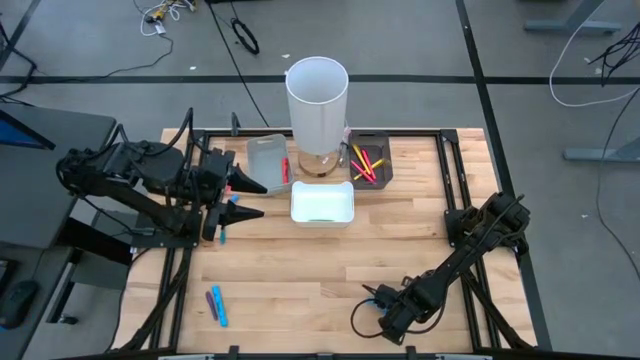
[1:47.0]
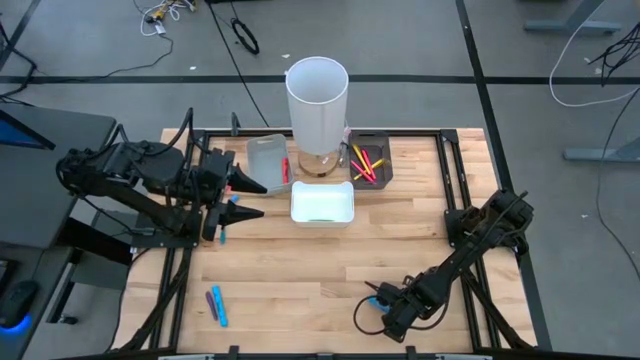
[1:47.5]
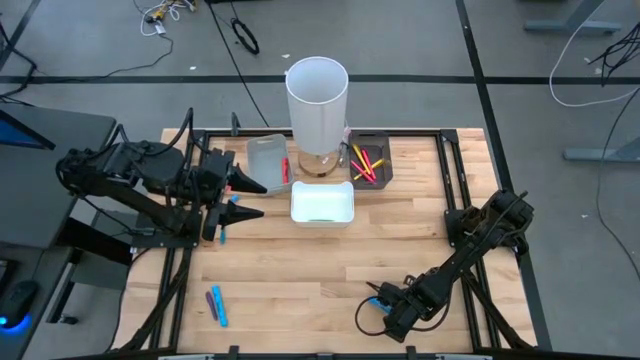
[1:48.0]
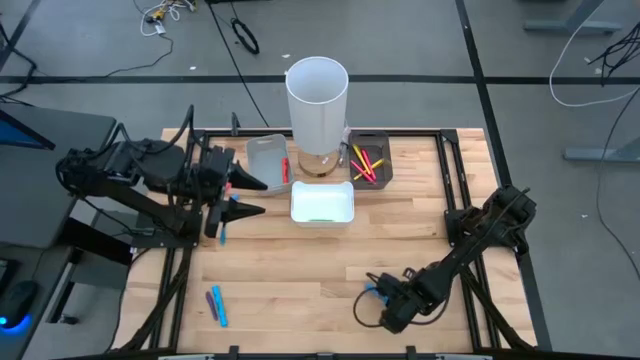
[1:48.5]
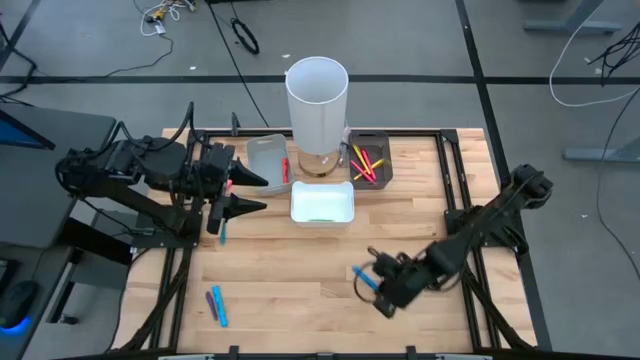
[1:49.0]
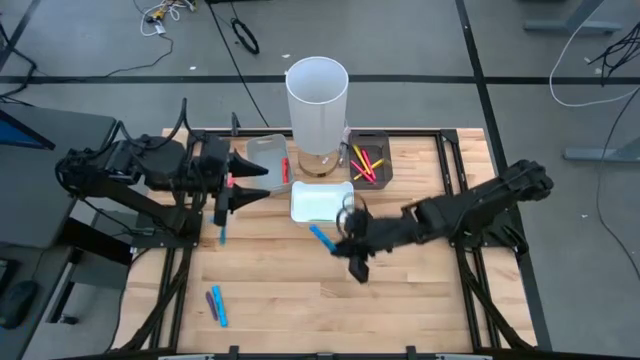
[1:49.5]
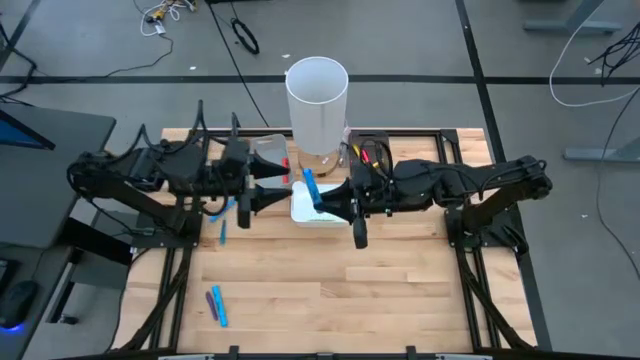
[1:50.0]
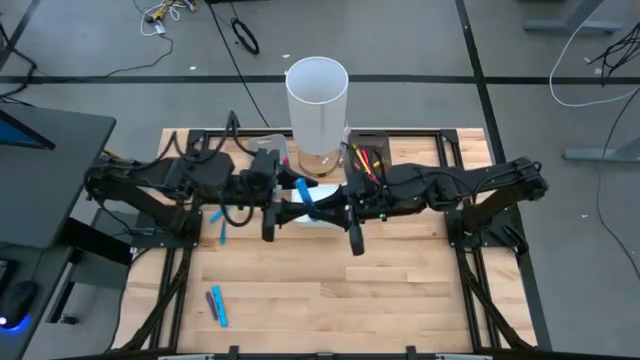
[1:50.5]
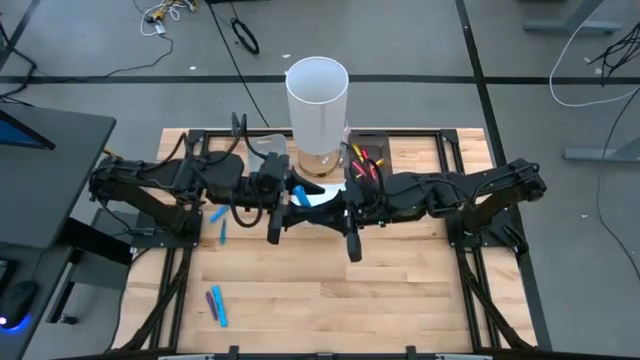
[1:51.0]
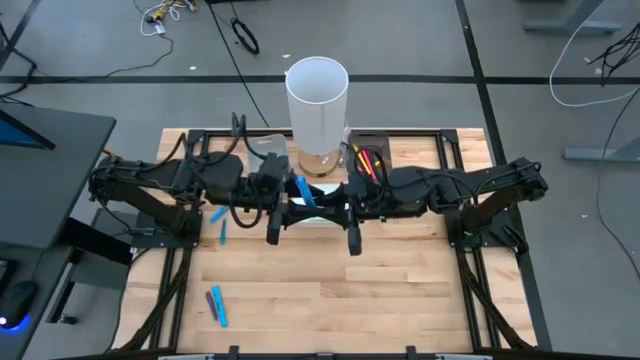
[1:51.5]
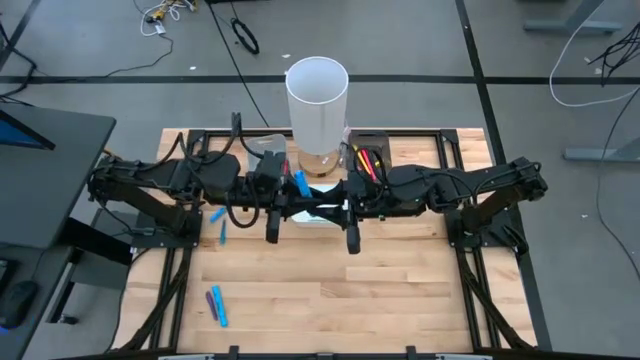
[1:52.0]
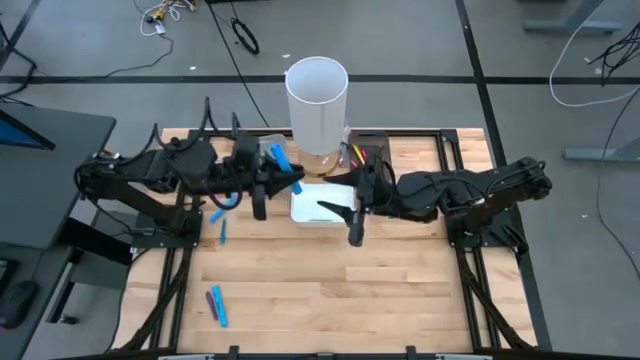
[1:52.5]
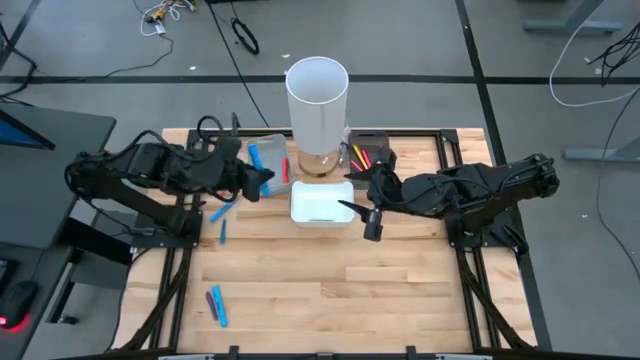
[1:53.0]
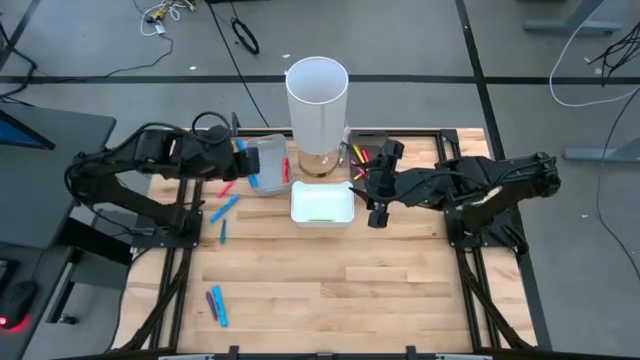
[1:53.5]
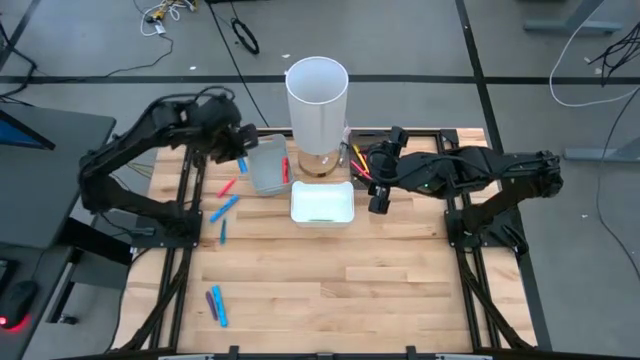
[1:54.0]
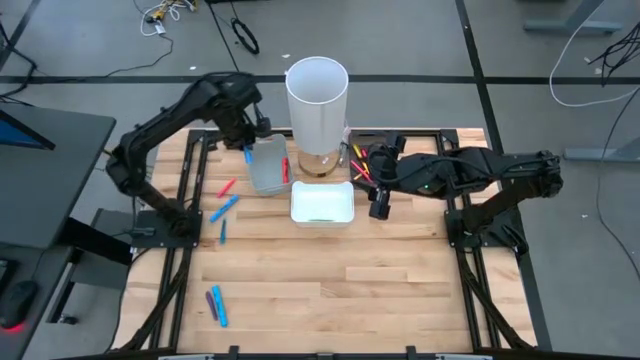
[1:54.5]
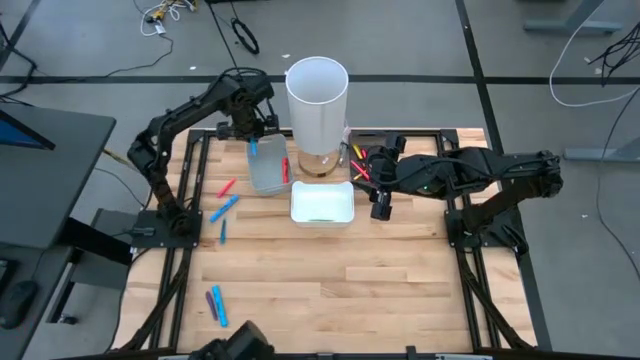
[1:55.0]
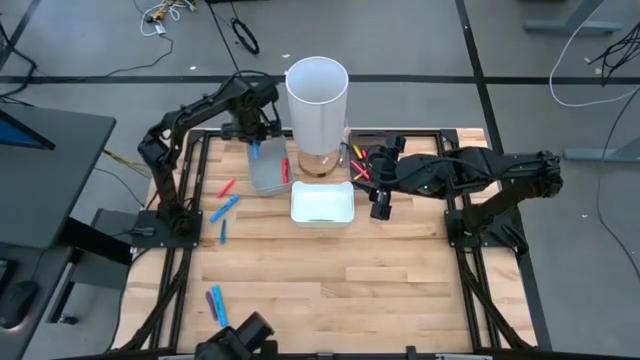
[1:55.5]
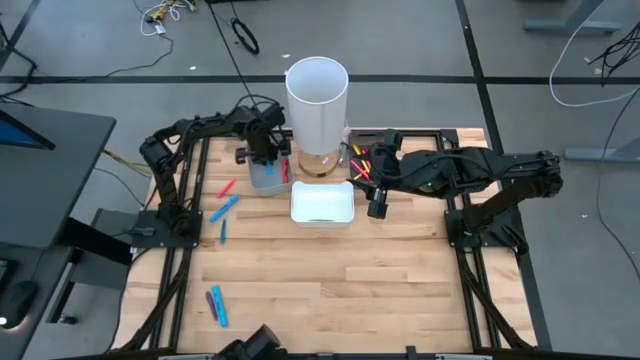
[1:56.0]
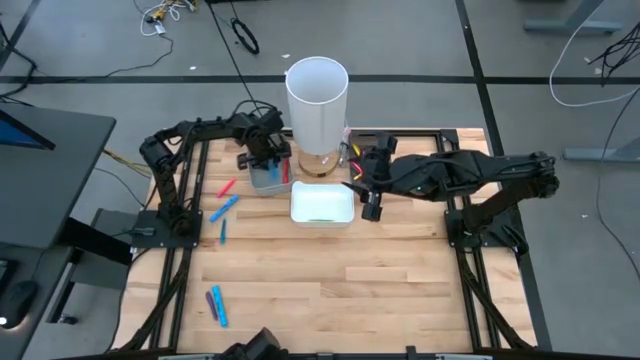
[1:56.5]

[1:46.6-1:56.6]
Task: Pick & Place Markers
Put the bottom right blue highlighter pen into the gray bin

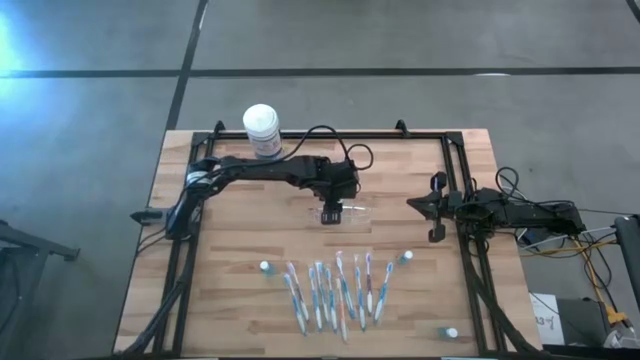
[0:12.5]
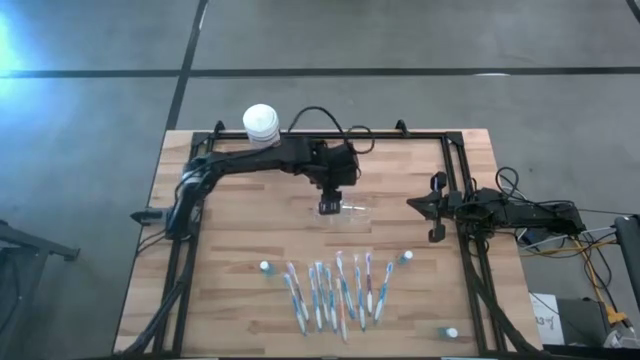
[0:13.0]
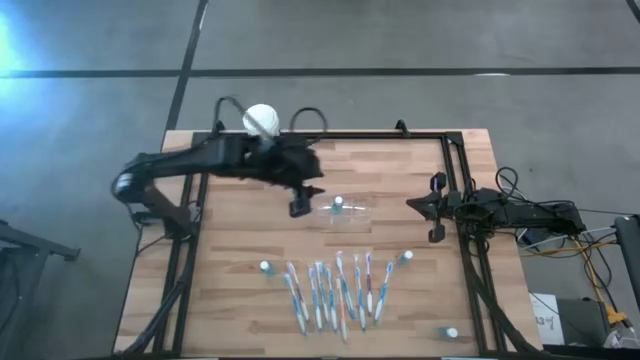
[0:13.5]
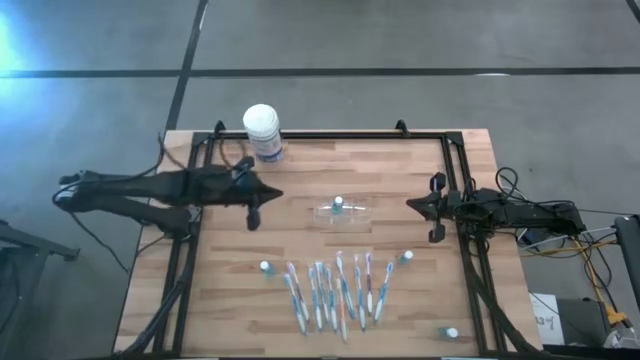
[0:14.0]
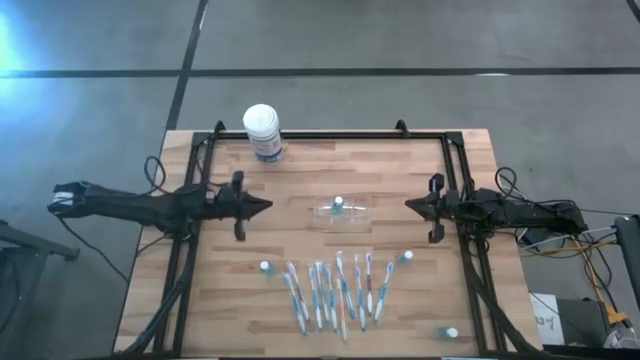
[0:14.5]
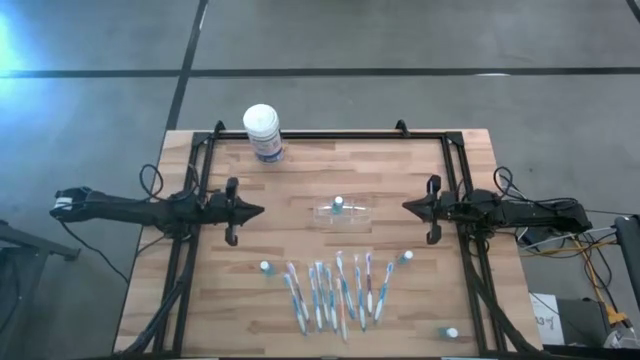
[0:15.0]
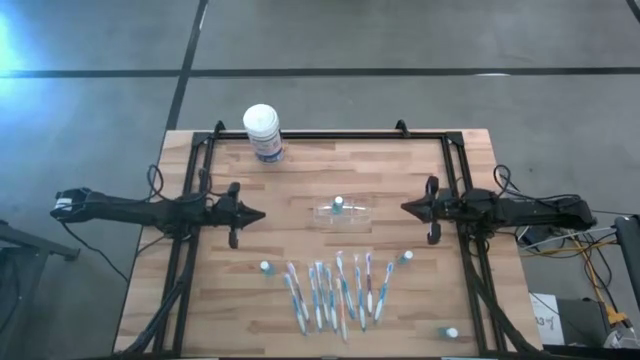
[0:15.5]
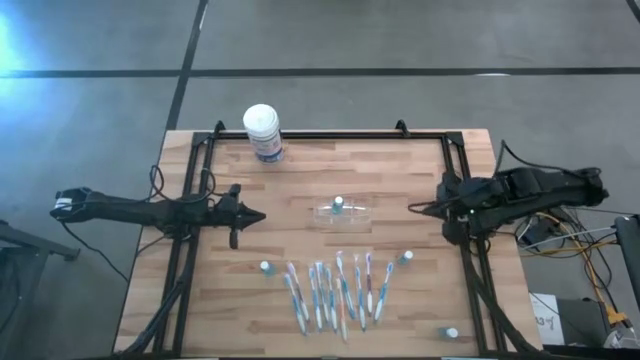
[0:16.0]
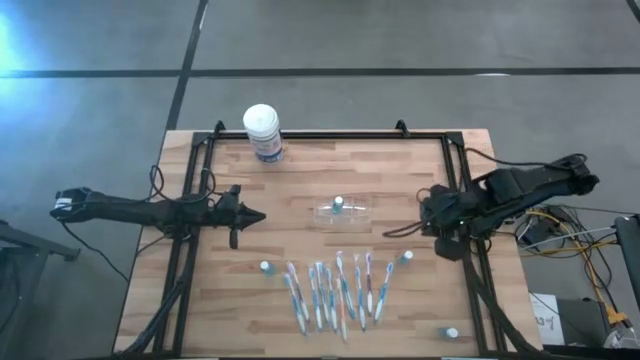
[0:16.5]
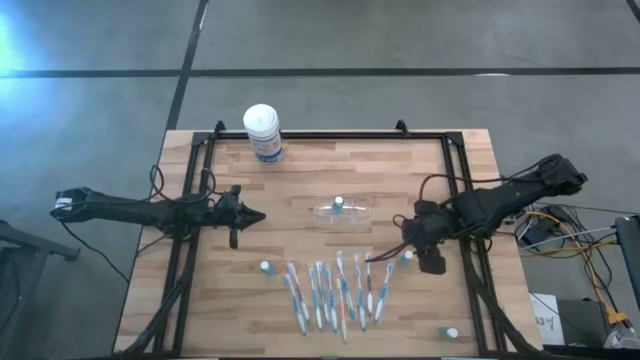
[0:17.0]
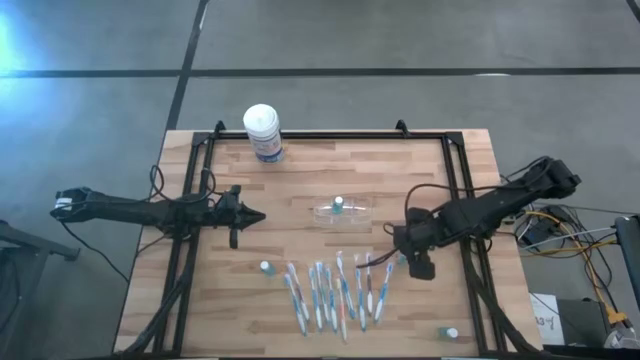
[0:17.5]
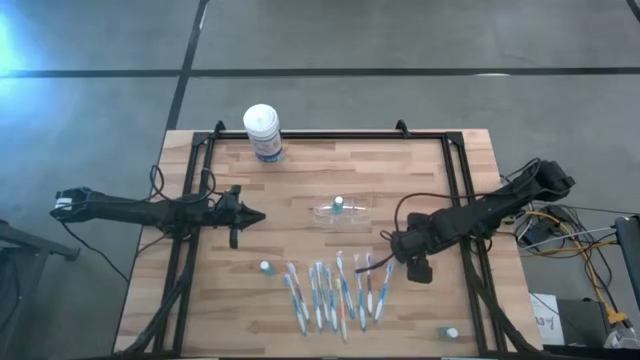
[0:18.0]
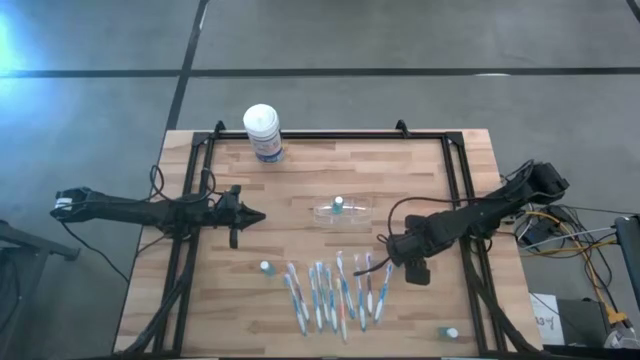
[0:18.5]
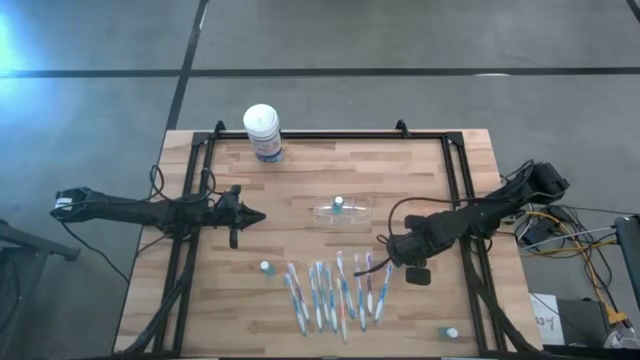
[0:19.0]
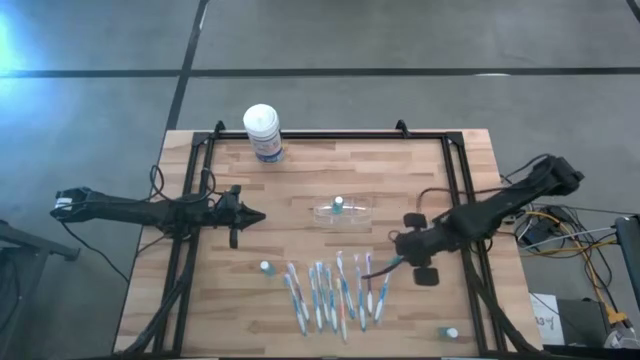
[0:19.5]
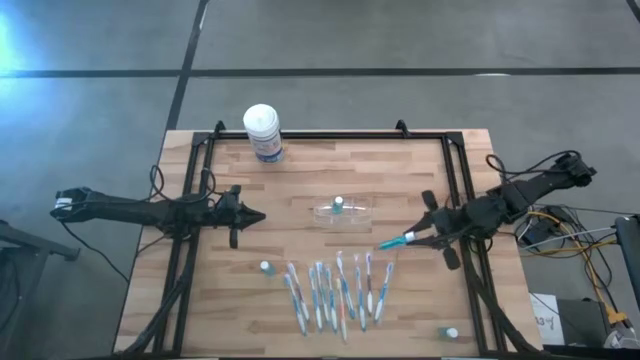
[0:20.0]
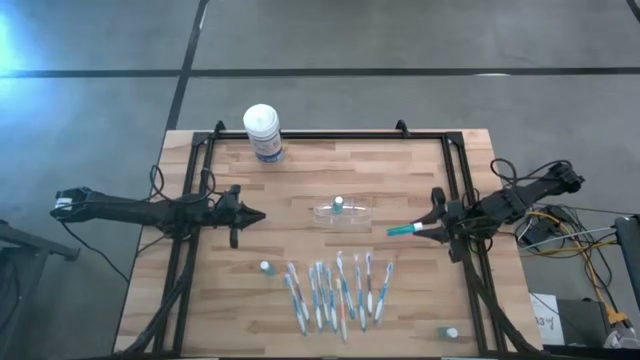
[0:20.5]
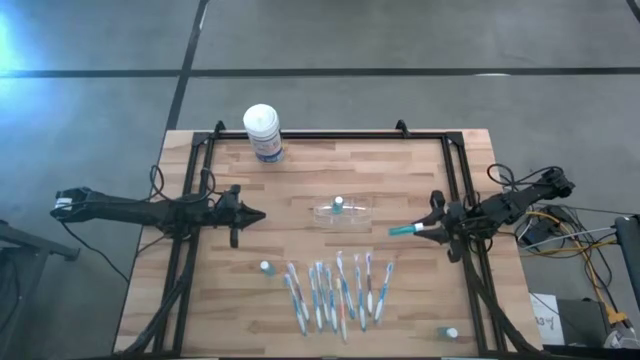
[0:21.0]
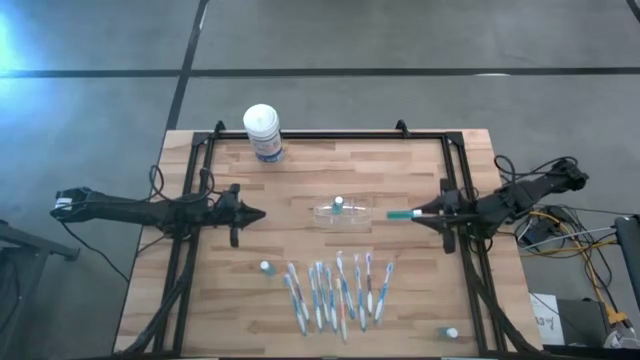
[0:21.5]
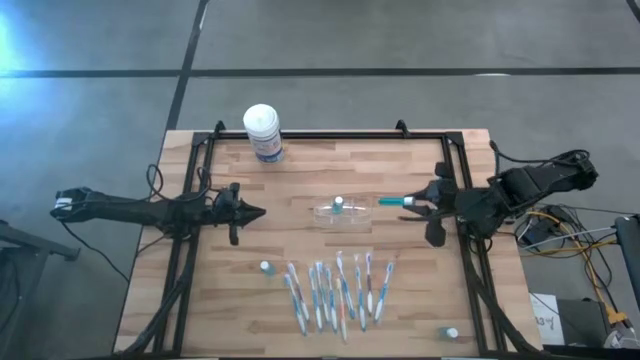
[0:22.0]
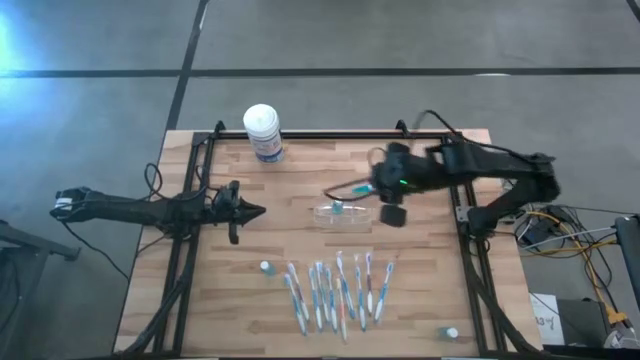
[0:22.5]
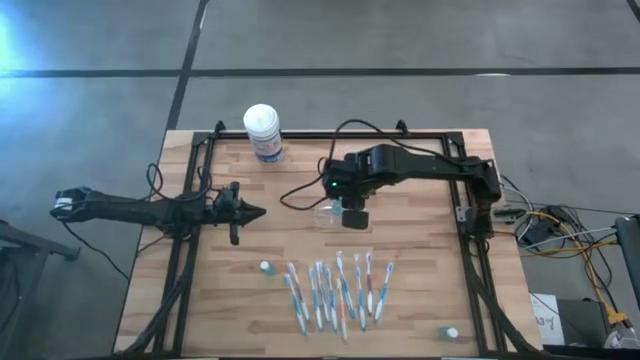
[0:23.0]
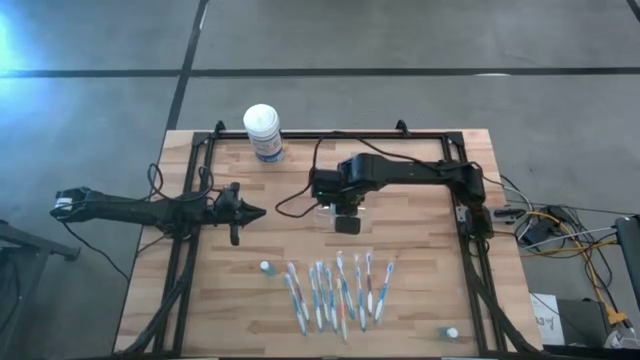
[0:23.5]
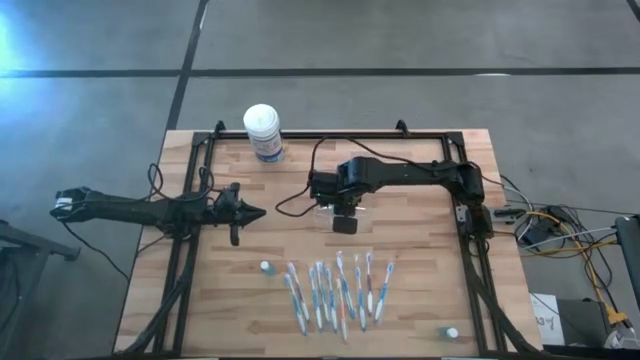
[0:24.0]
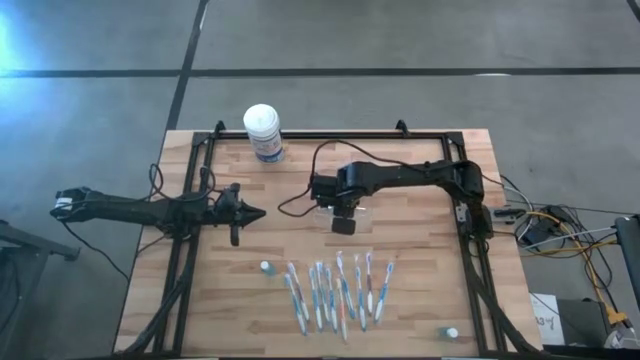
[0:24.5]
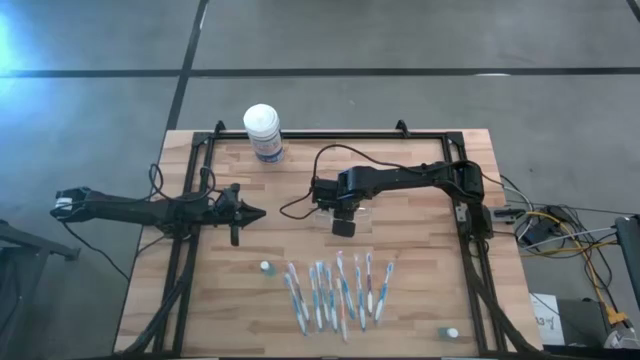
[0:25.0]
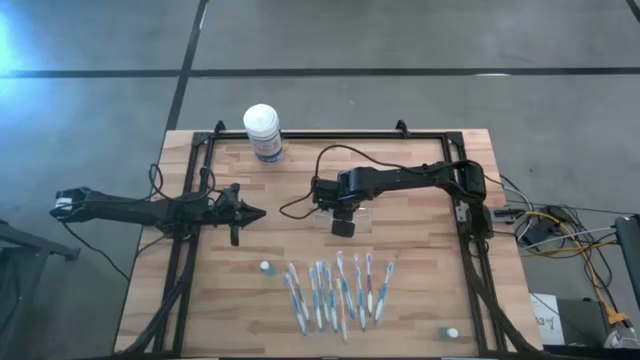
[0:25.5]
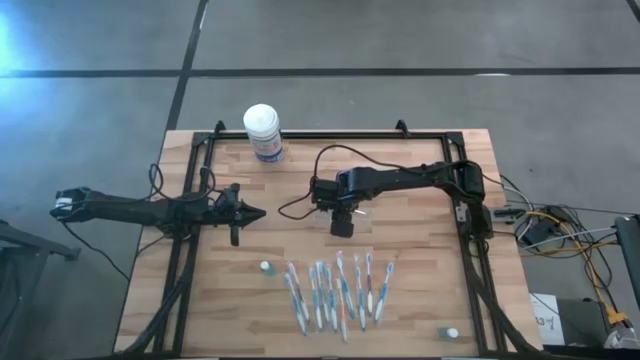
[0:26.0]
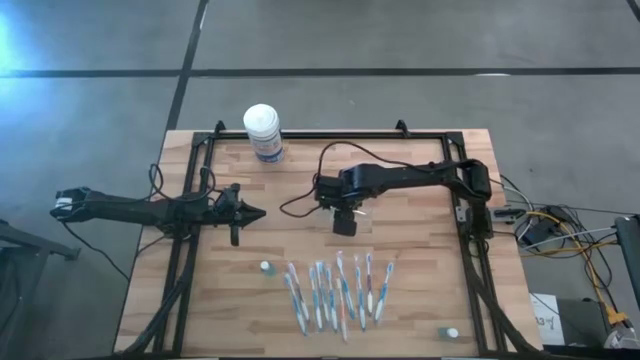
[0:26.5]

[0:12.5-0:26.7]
Task: Pick & Place toothbrushing station
Put the blue mouthwash into the transparent organizer
